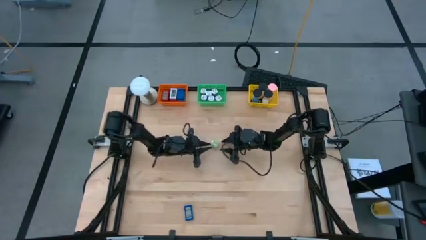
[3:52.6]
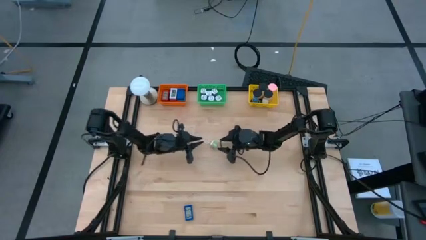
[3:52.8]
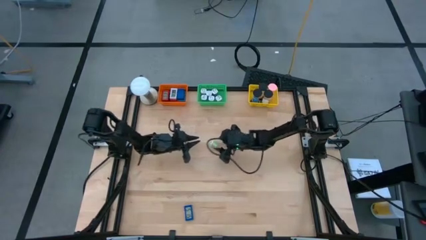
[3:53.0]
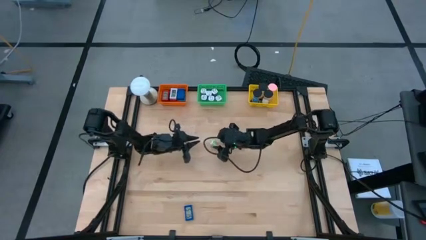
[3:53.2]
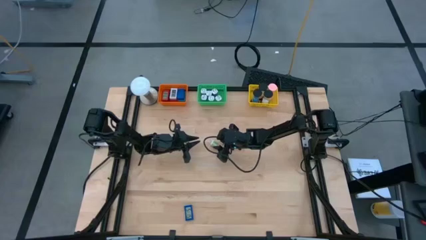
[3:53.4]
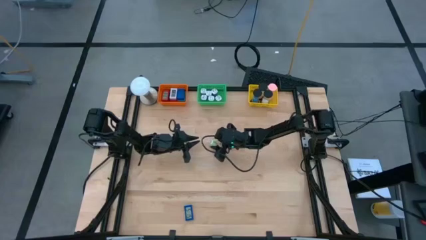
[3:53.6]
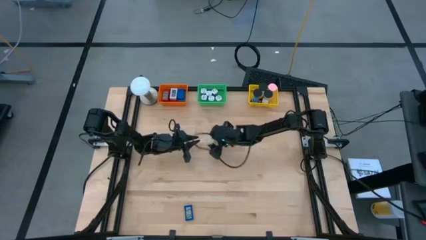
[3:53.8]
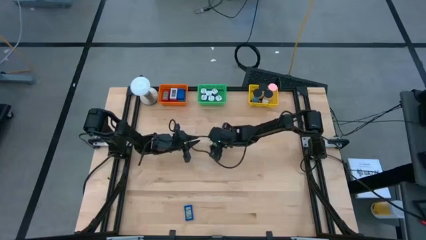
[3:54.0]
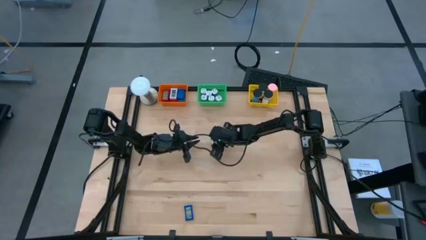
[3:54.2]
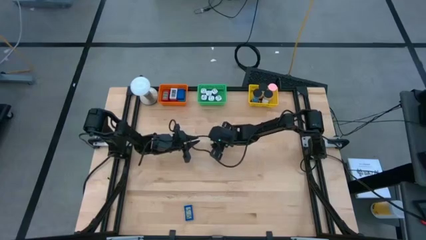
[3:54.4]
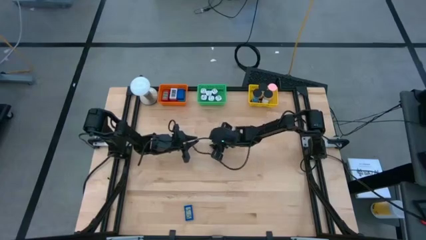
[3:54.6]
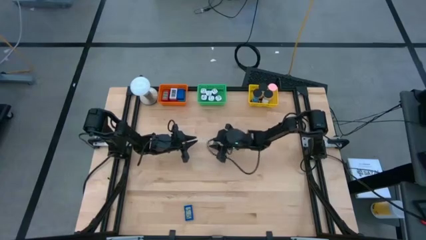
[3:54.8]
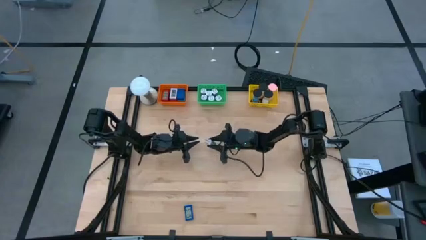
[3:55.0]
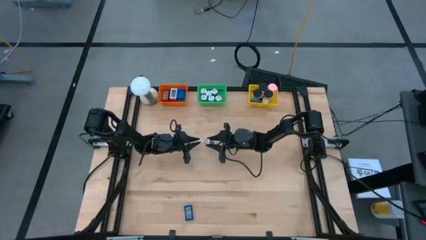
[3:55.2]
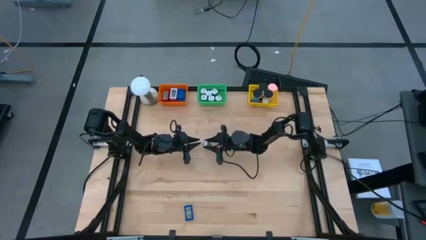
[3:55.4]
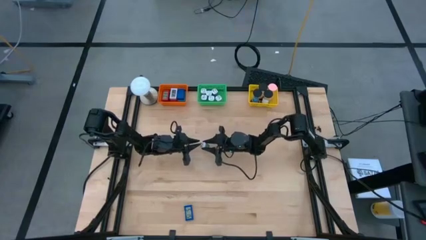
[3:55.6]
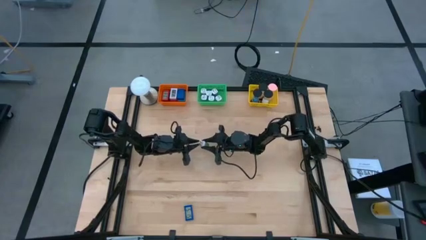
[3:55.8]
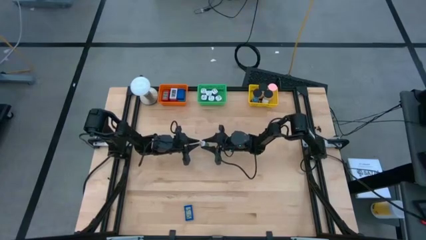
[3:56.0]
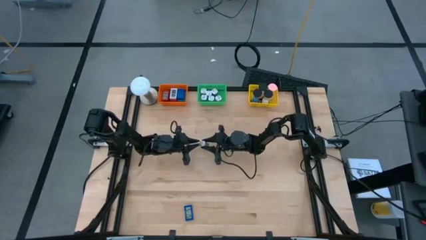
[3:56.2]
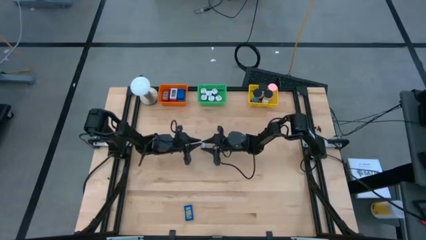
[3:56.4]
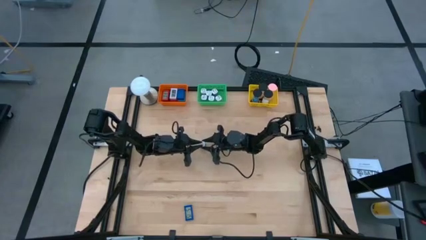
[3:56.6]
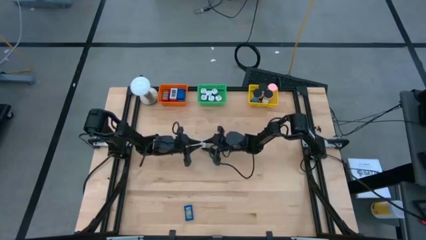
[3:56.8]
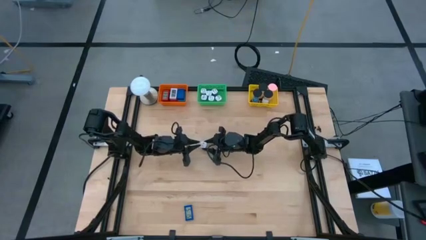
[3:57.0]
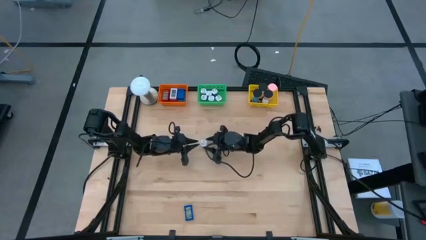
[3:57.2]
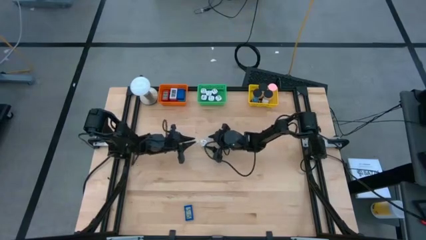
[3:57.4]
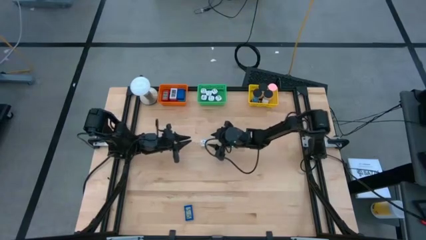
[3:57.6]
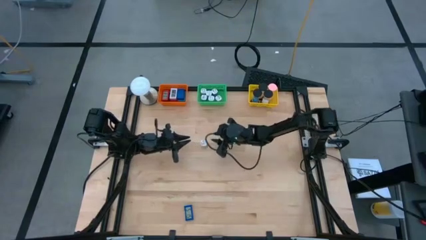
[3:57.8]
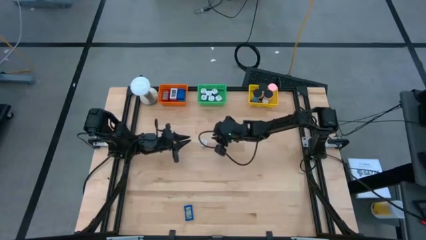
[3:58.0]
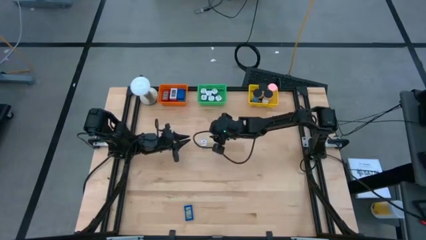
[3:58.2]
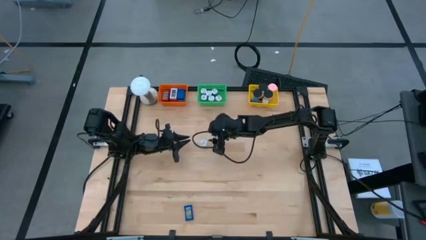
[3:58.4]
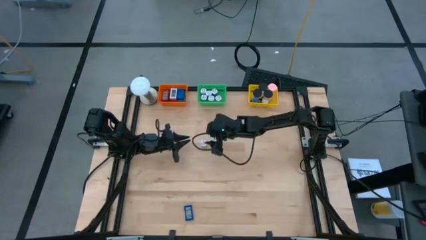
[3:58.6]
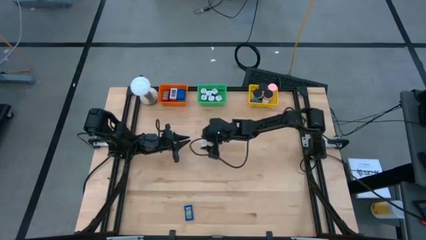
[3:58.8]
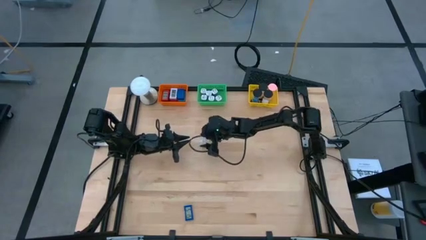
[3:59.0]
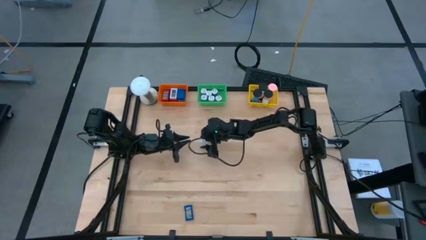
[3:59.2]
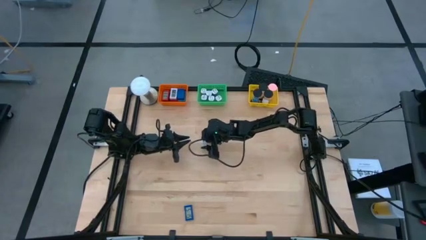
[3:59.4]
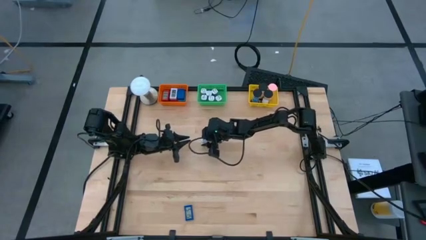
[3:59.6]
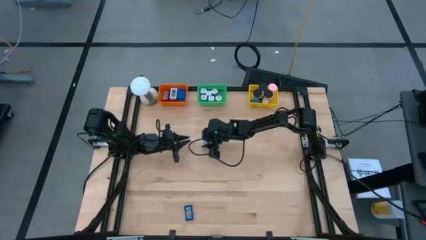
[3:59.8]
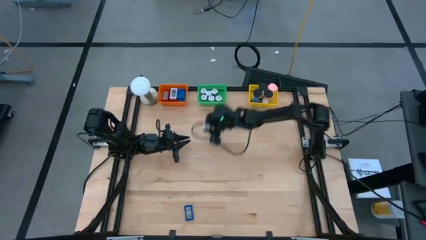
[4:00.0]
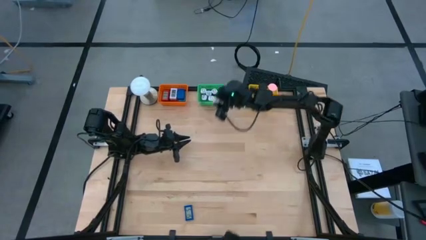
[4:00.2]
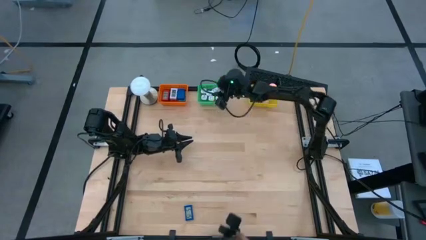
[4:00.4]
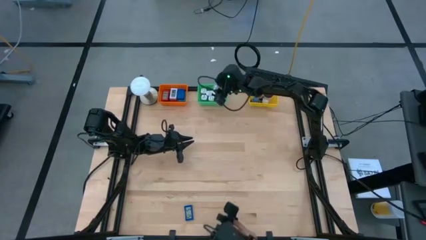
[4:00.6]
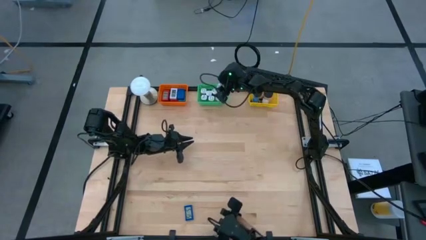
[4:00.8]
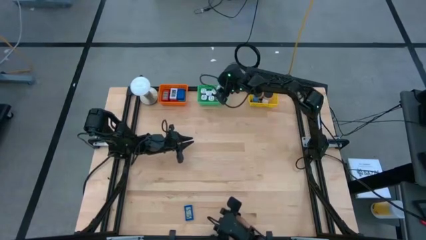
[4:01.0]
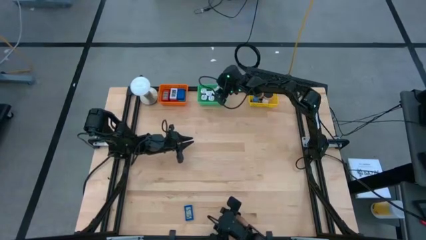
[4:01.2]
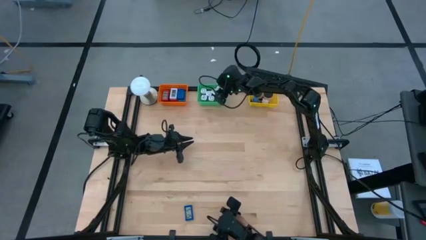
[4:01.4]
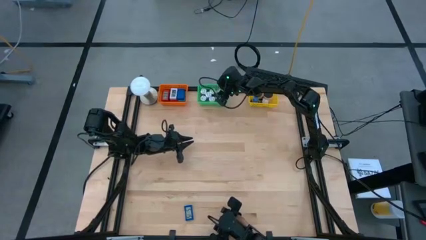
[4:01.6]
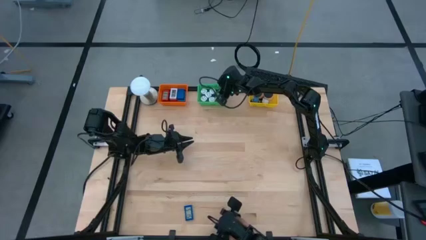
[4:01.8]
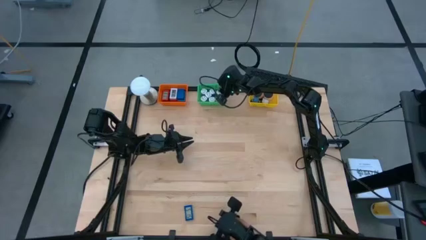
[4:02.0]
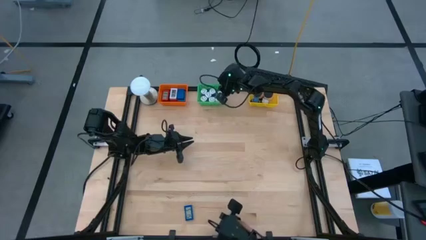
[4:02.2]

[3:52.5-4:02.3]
Task: Pick & Place Office items
Put the green charger adapter into the green basket
